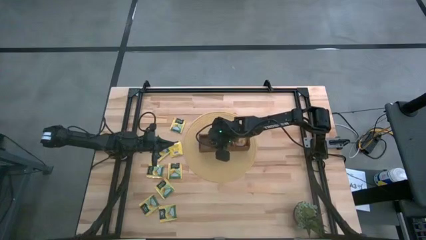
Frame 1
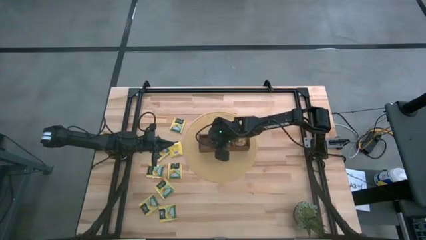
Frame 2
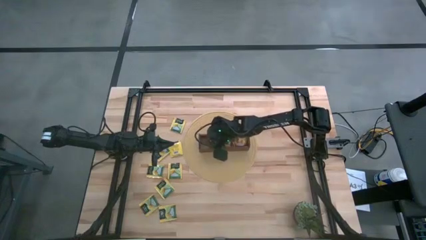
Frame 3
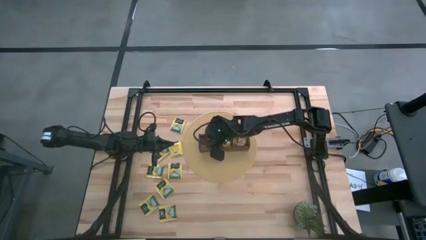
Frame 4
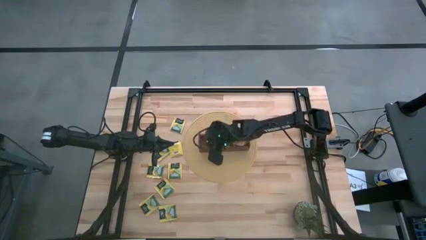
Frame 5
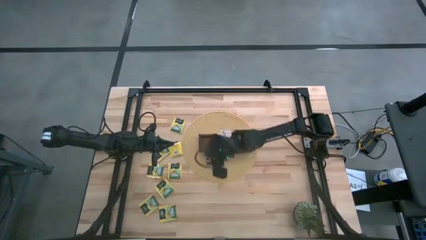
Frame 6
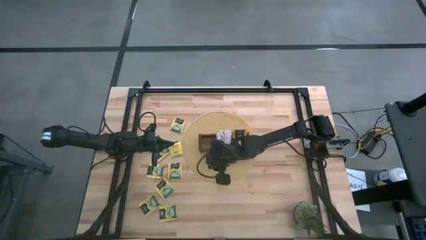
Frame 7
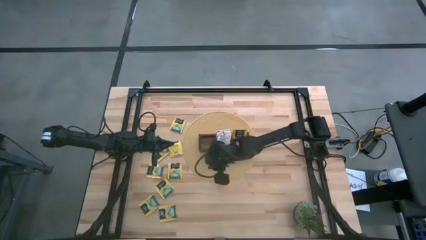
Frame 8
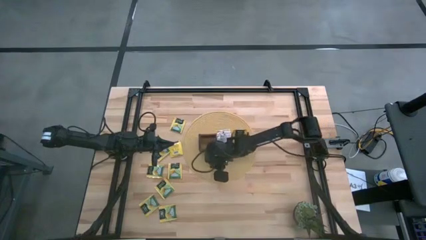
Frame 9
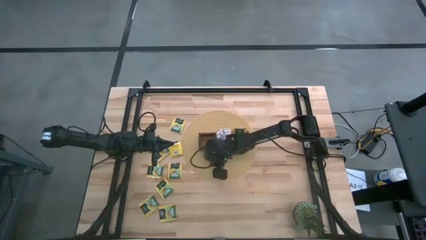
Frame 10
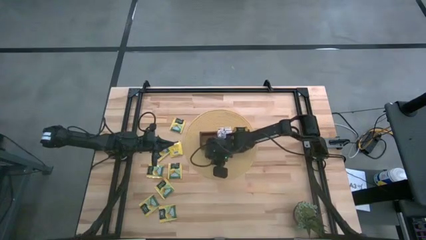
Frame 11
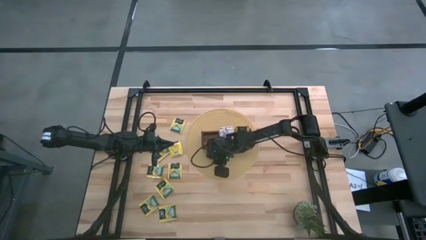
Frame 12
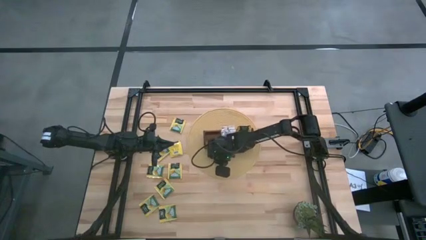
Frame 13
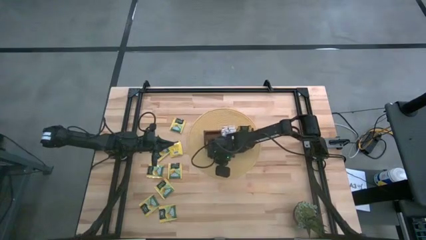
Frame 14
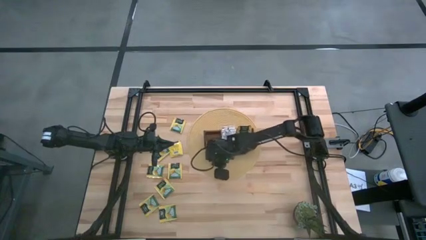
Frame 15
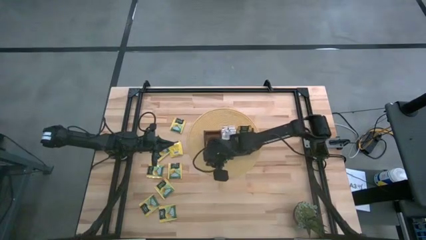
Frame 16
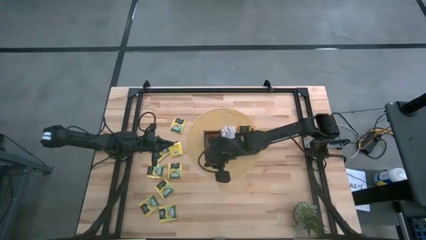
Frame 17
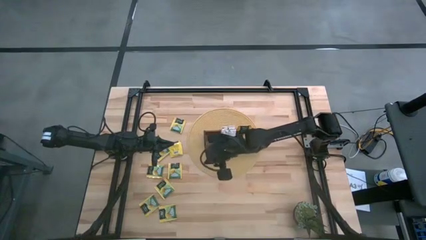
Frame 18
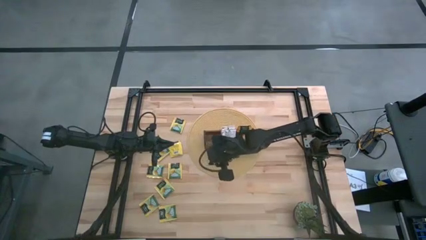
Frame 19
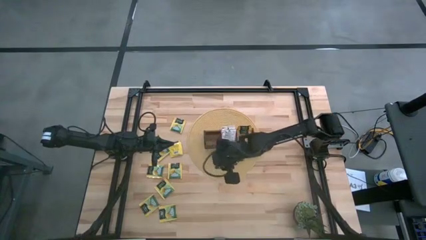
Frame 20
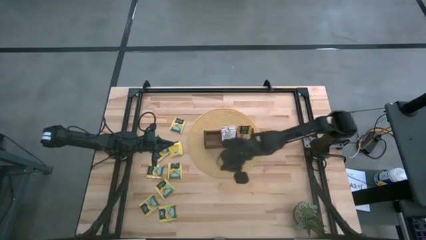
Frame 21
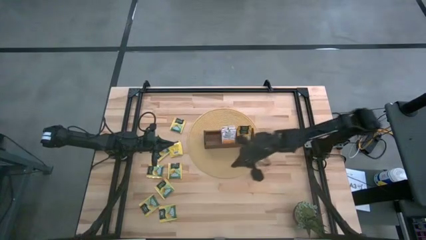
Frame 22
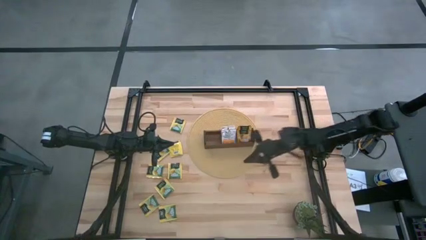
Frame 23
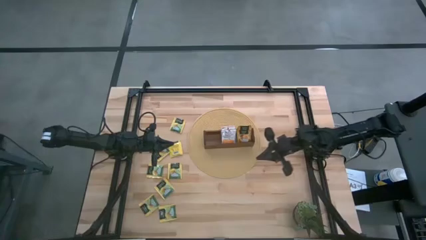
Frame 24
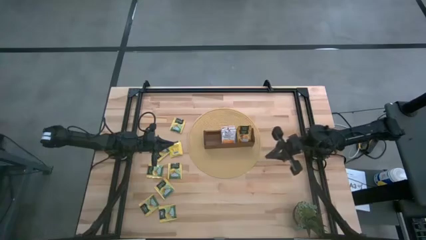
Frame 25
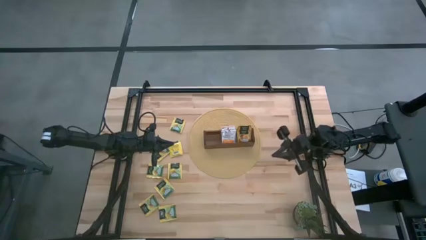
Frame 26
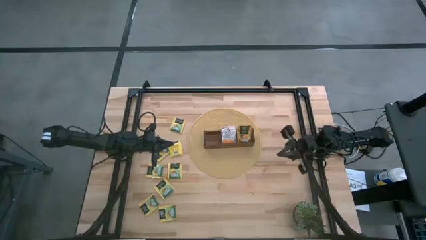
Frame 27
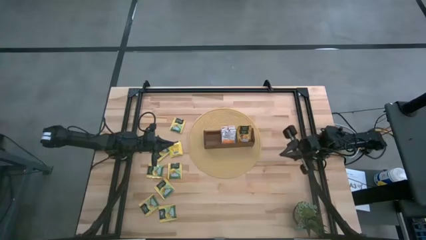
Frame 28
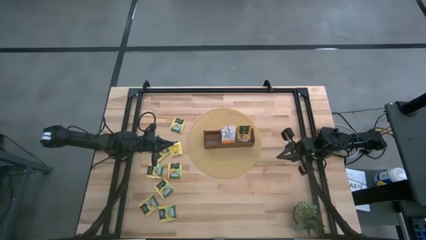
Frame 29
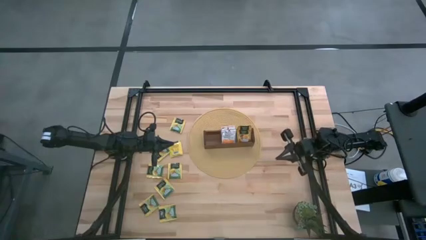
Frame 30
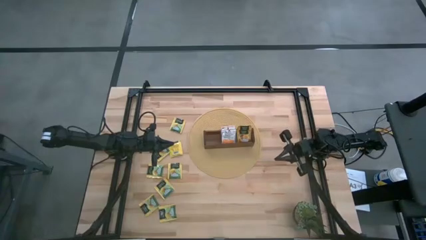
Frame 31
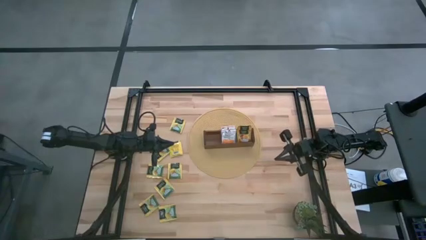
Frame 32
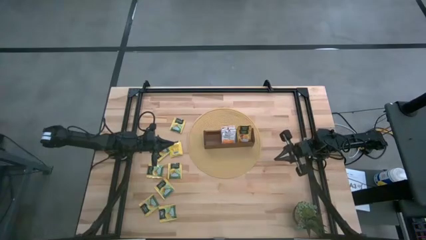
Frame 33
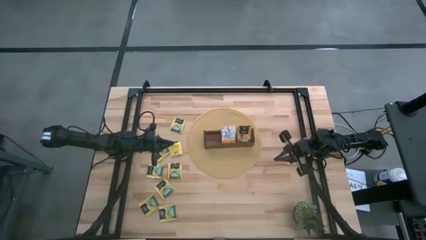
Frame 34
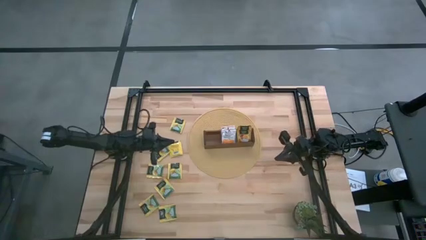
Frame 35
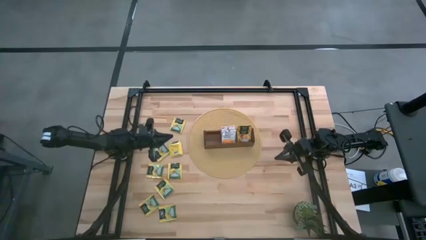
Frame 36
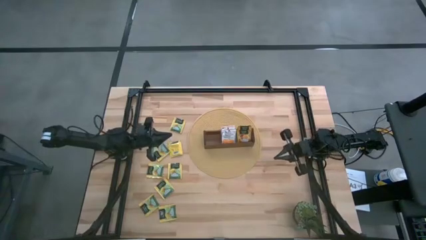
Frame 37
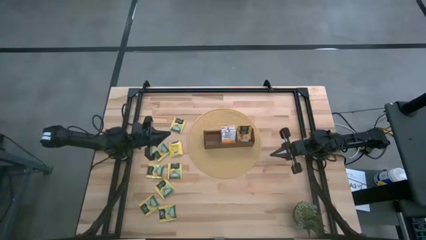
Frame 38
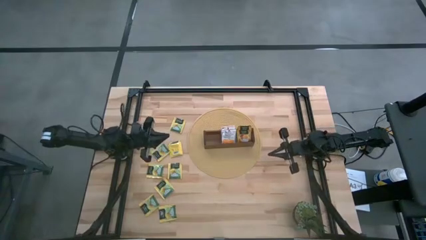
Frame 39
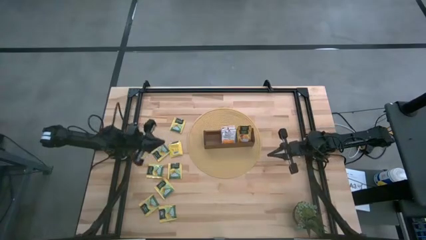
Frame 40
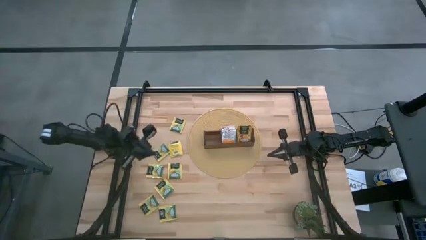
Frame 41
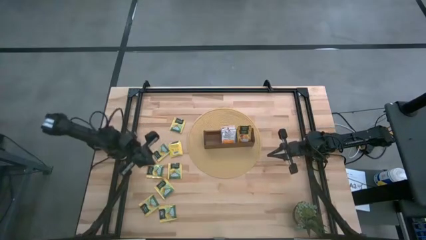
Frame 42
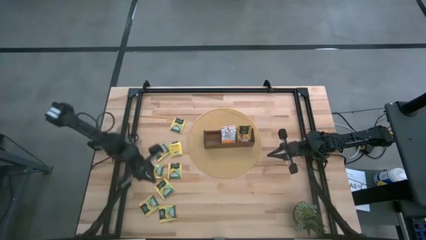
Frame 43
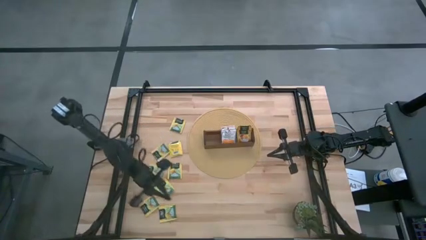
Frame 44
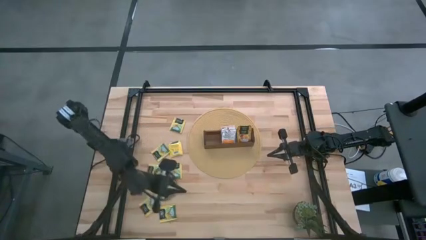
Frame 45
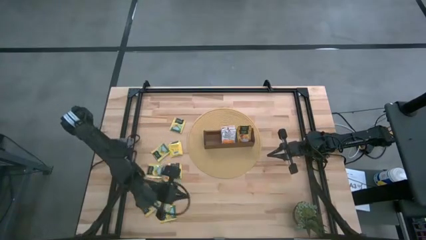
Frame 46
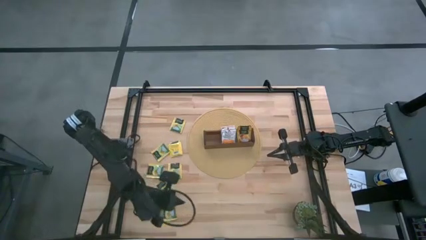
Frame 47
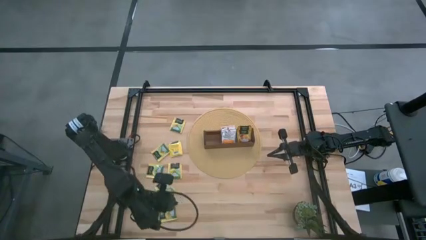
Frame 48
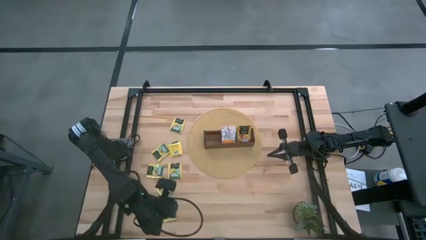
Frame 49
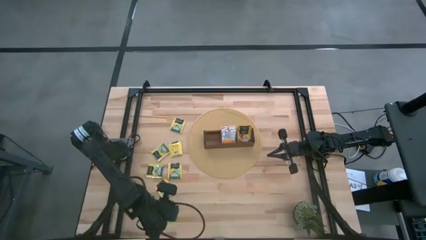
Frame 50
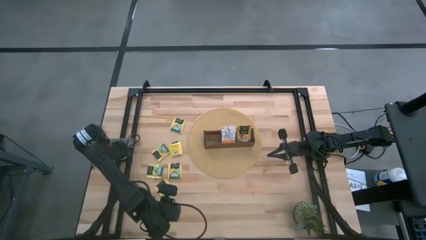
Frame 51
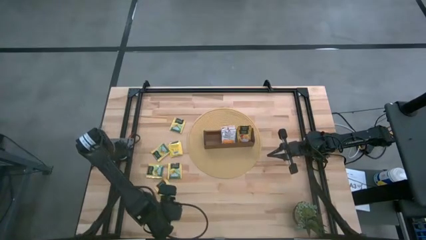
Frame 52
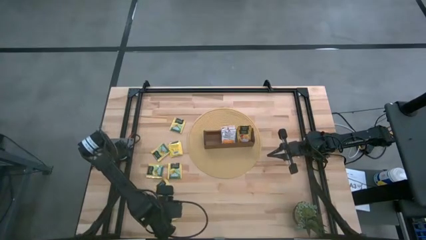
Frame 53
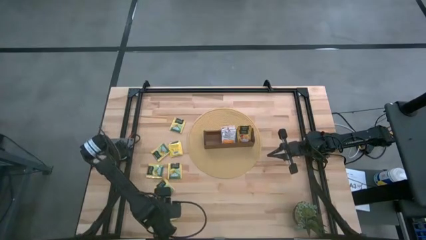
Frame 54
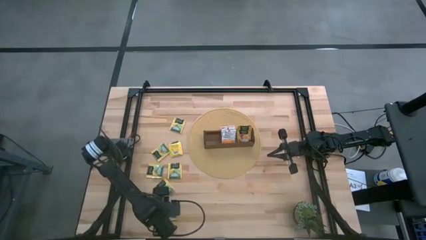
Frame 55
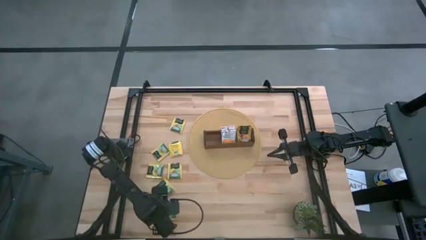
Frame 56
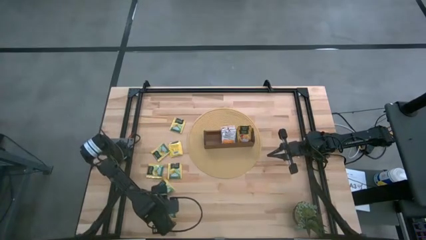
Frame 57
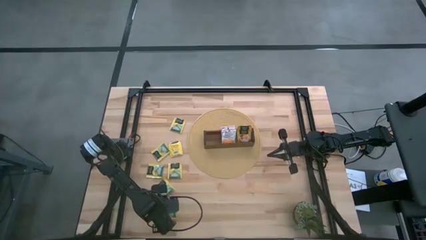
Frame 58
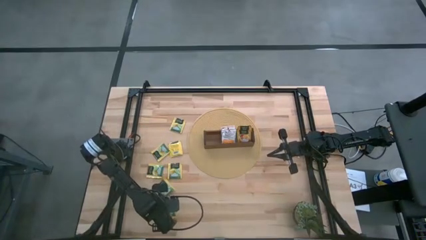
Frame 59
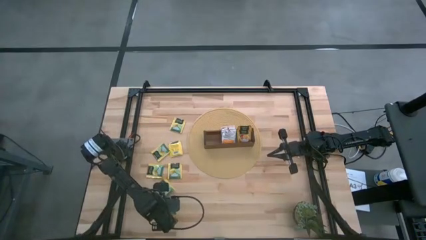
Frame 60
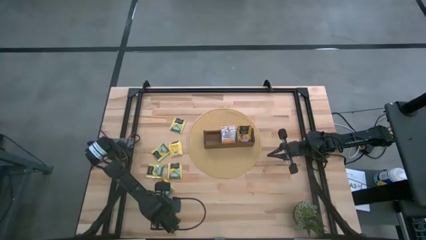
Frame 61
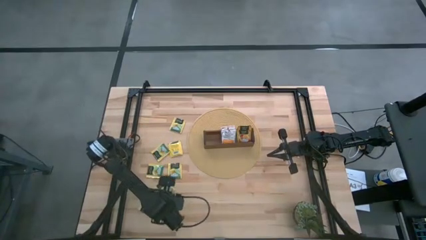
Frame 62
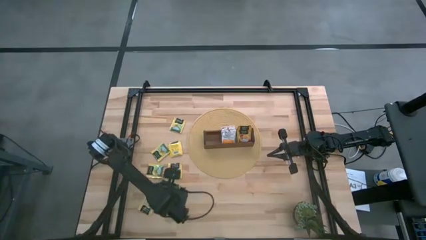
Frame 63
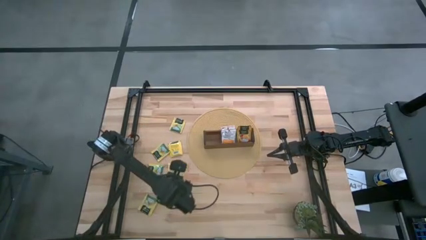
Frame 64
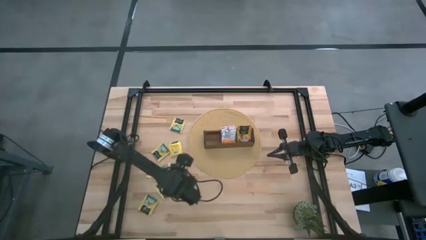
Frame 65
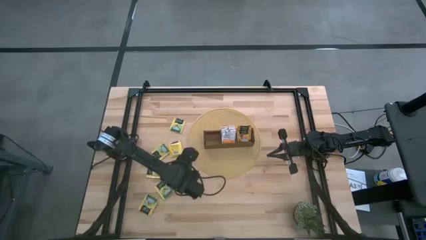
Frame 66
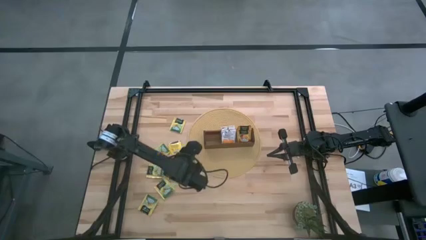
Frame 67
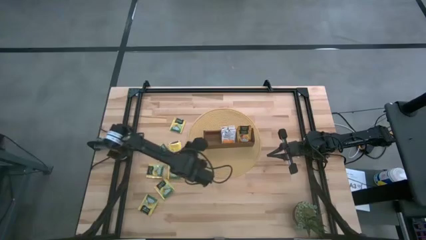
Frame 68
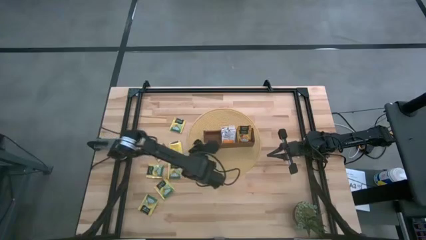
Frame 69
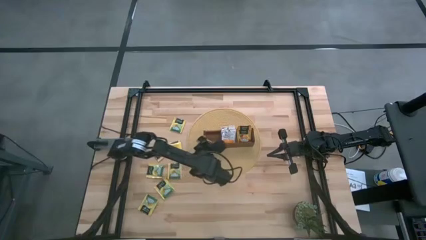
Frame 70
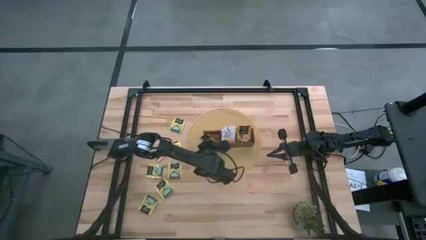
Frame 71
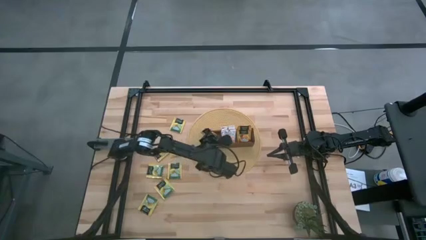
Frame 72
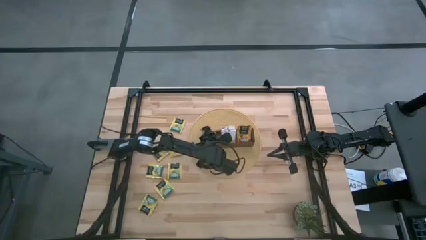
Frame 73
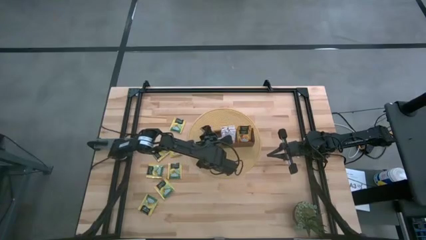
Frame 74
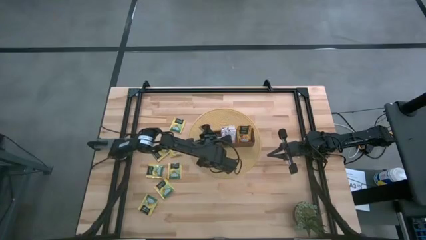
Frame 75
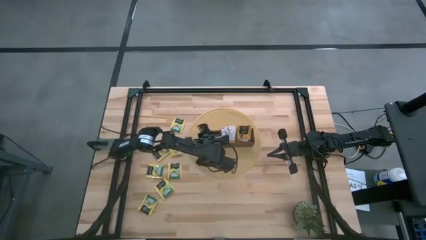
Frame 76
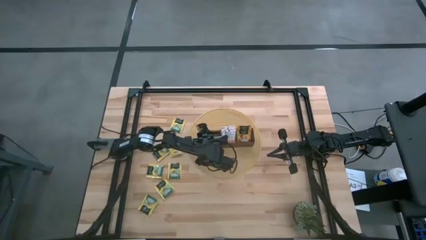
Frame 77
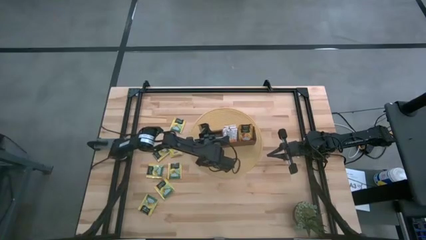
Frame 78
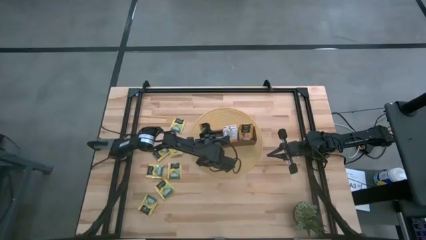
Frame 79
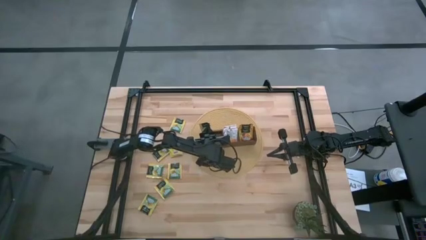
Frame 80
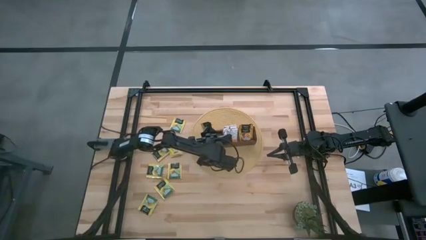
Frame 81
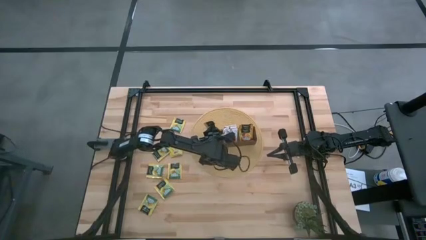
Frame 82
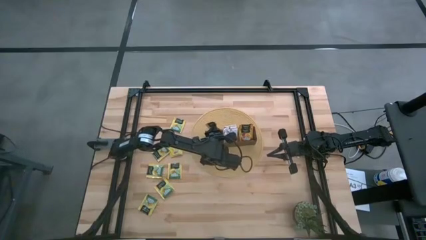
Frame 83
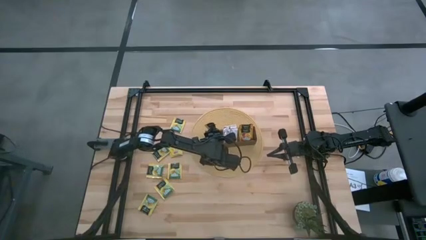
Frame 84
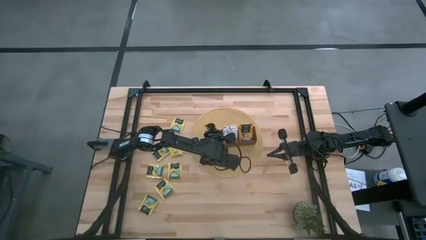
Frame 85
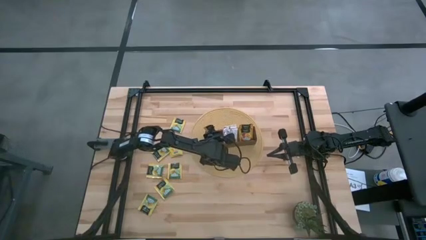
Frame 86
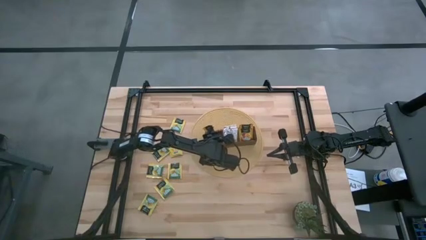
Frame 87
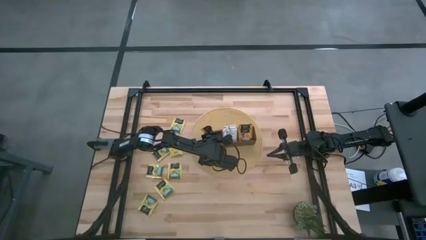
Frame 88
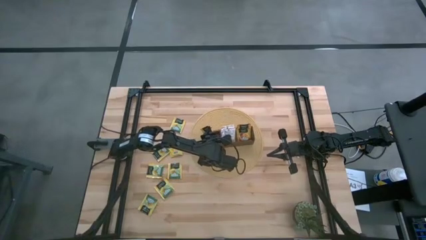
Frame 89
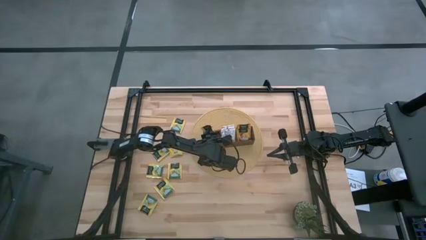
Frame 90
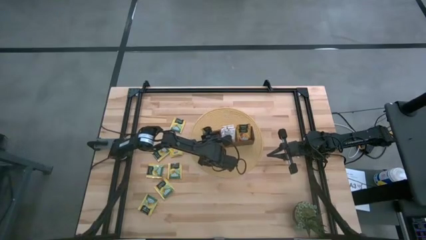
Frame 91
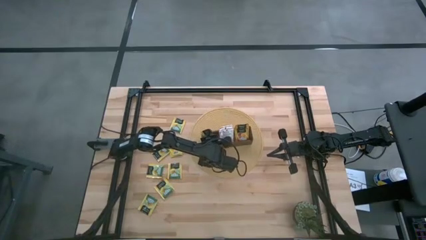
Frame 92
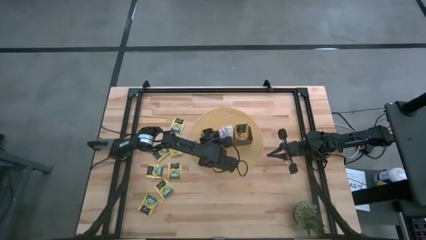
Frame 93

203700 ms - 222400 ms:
Task: Pick & Place Tea
Put the yellow tea bag into the left section of the wooden organizer
